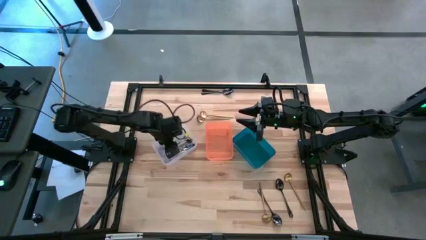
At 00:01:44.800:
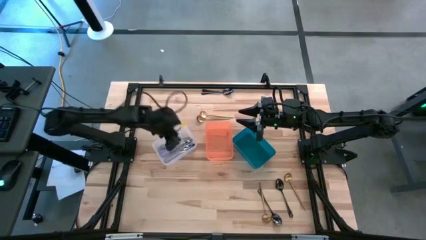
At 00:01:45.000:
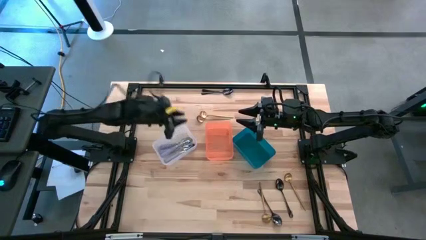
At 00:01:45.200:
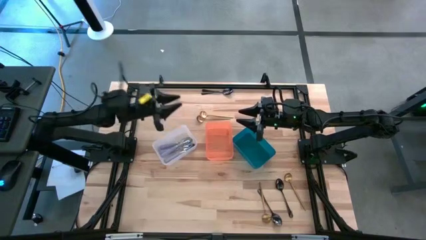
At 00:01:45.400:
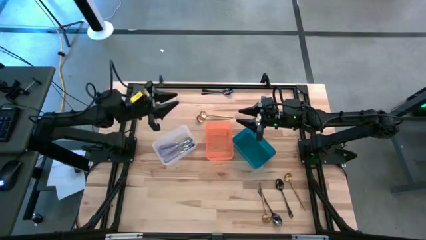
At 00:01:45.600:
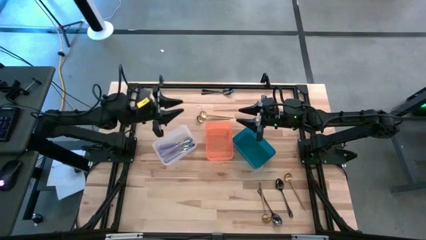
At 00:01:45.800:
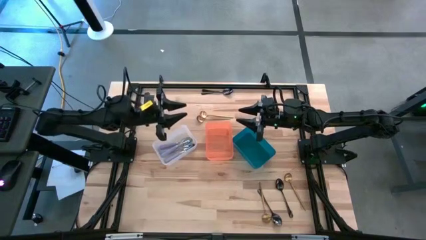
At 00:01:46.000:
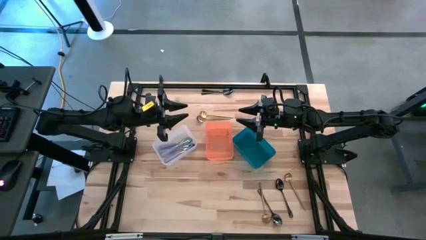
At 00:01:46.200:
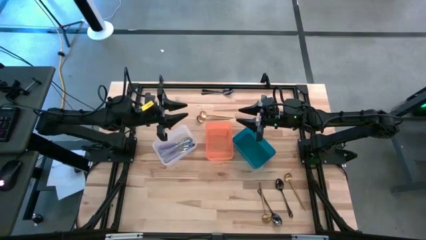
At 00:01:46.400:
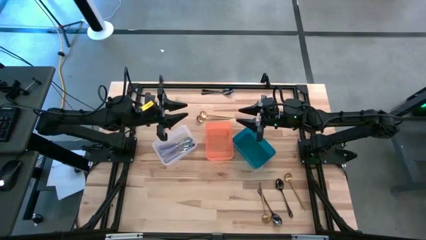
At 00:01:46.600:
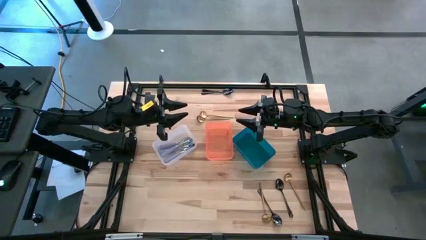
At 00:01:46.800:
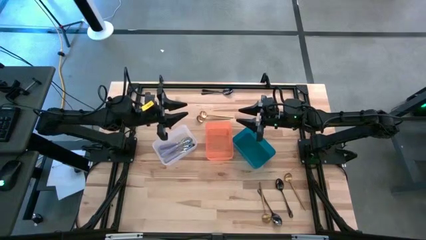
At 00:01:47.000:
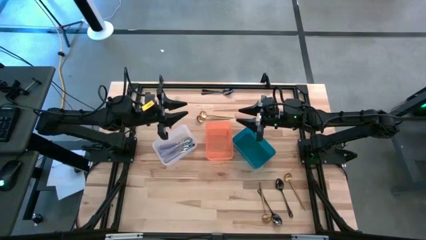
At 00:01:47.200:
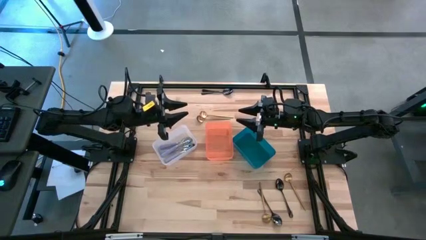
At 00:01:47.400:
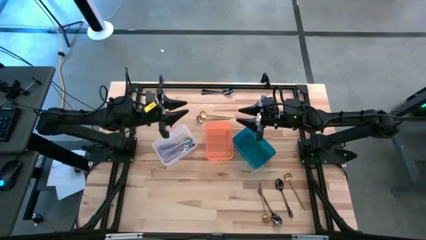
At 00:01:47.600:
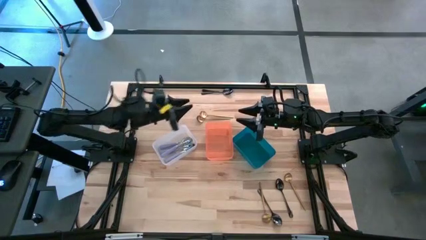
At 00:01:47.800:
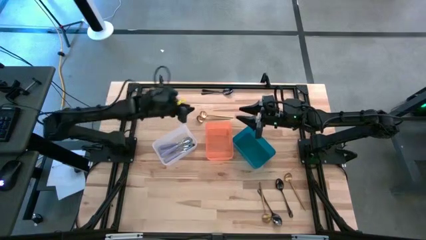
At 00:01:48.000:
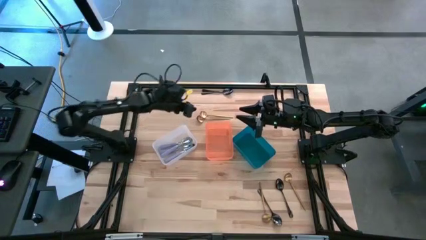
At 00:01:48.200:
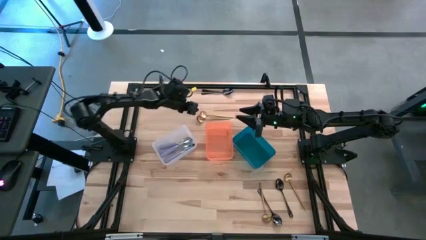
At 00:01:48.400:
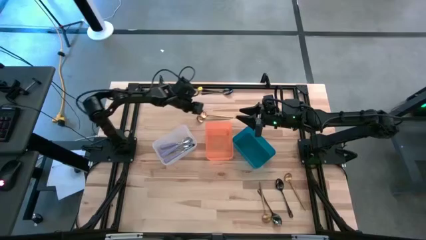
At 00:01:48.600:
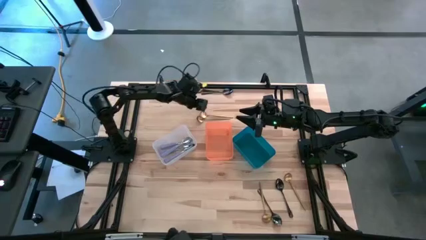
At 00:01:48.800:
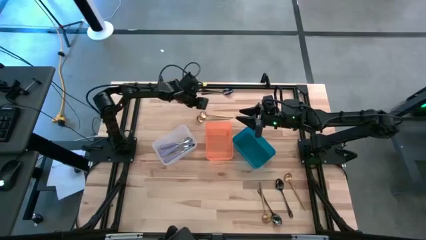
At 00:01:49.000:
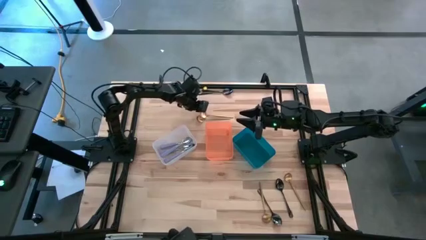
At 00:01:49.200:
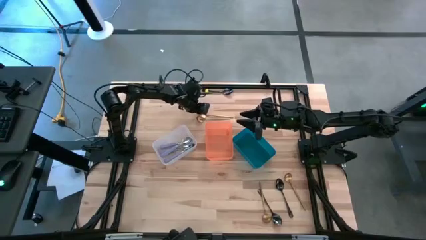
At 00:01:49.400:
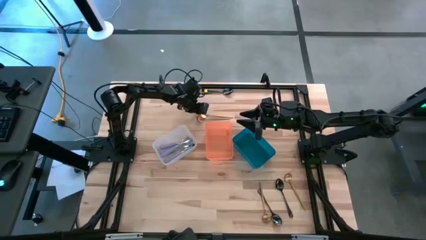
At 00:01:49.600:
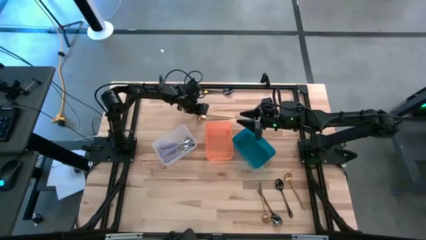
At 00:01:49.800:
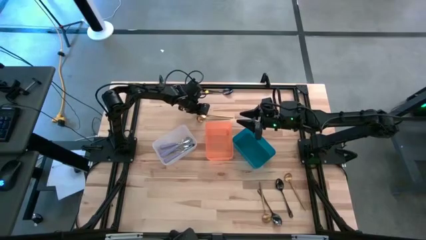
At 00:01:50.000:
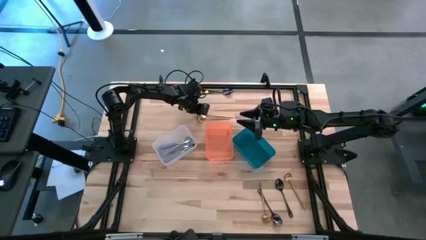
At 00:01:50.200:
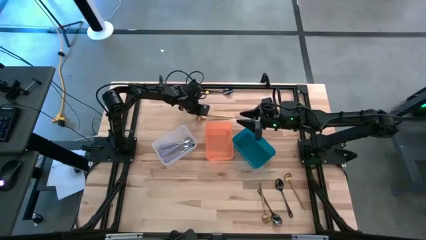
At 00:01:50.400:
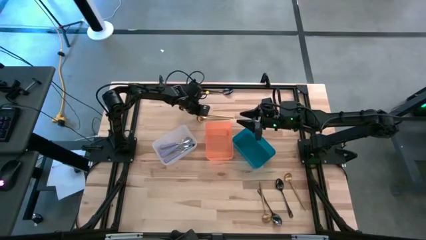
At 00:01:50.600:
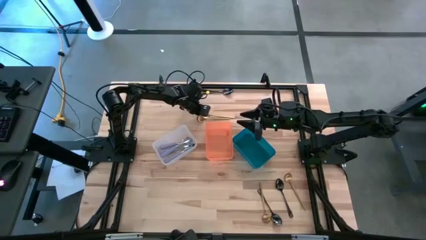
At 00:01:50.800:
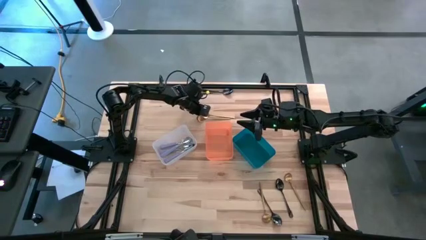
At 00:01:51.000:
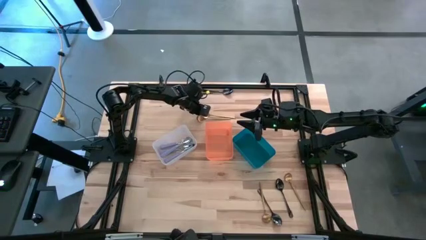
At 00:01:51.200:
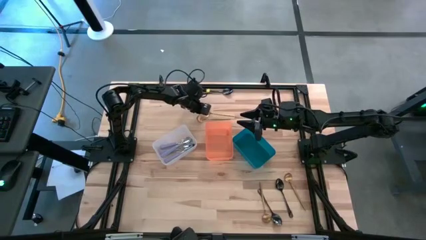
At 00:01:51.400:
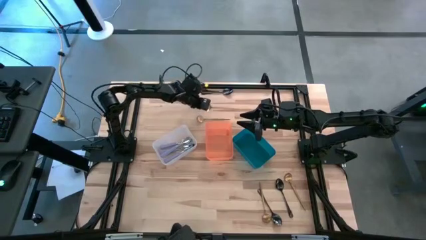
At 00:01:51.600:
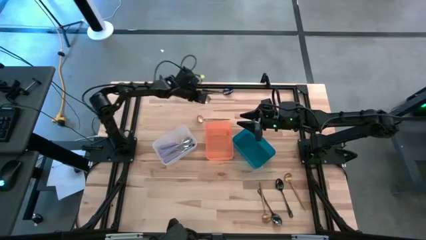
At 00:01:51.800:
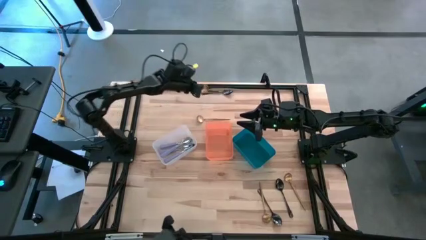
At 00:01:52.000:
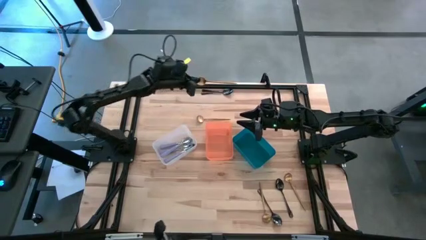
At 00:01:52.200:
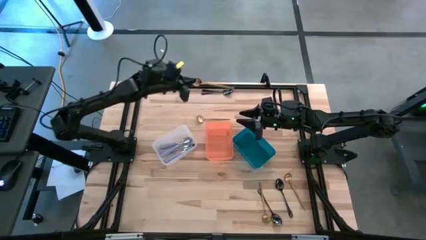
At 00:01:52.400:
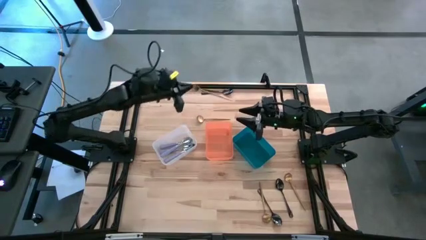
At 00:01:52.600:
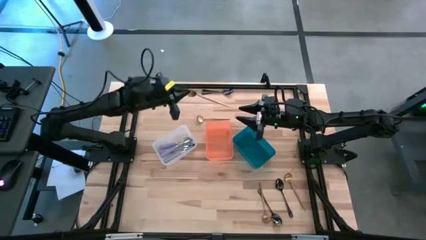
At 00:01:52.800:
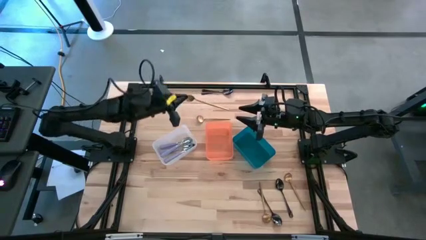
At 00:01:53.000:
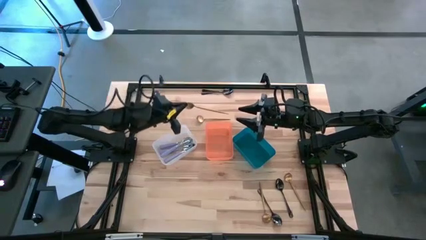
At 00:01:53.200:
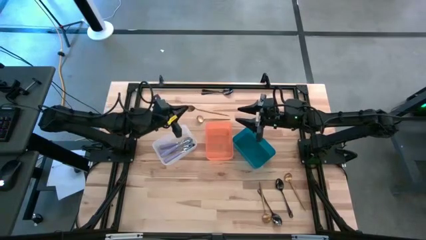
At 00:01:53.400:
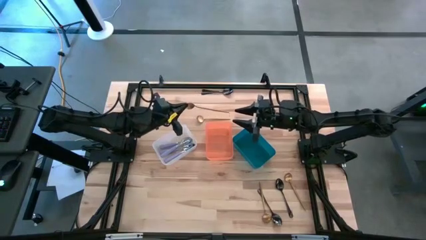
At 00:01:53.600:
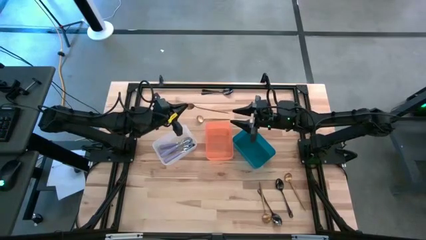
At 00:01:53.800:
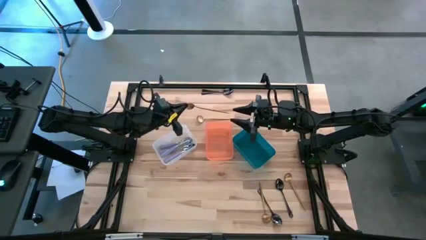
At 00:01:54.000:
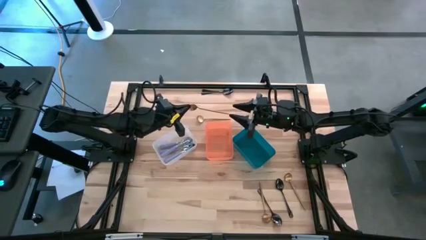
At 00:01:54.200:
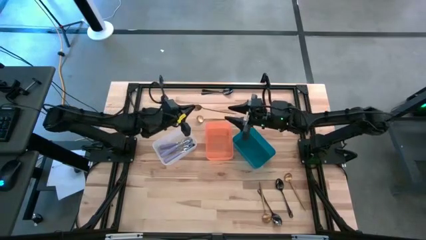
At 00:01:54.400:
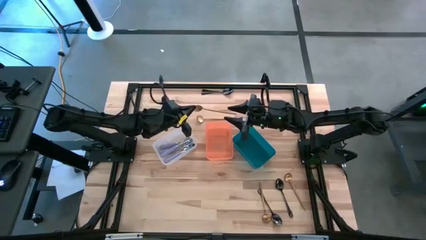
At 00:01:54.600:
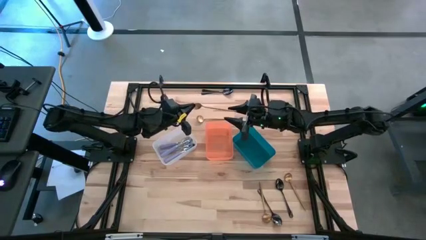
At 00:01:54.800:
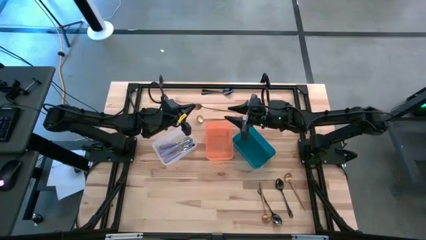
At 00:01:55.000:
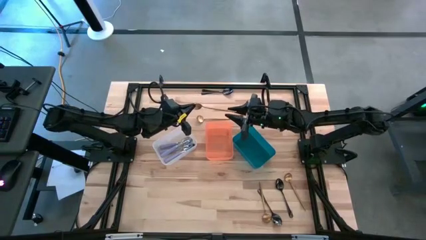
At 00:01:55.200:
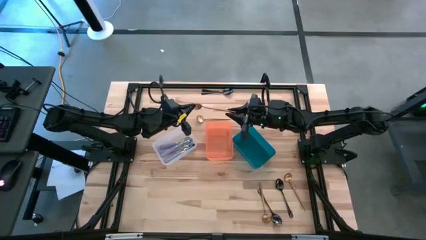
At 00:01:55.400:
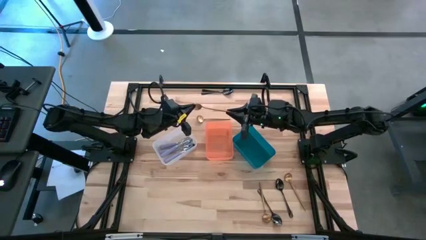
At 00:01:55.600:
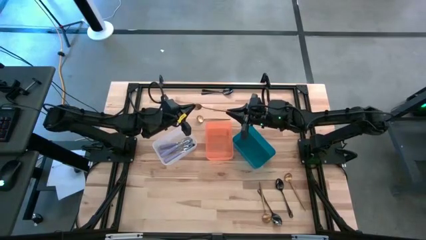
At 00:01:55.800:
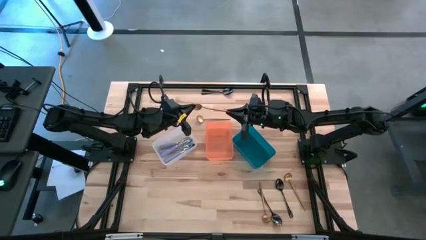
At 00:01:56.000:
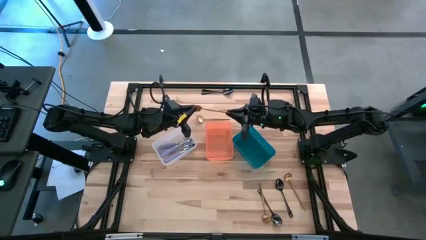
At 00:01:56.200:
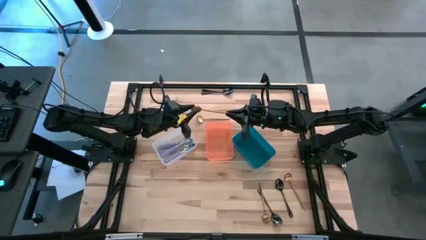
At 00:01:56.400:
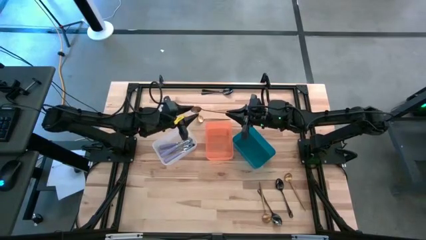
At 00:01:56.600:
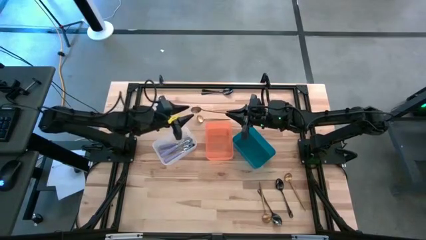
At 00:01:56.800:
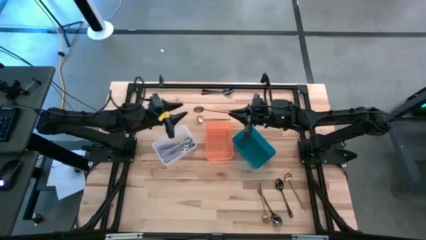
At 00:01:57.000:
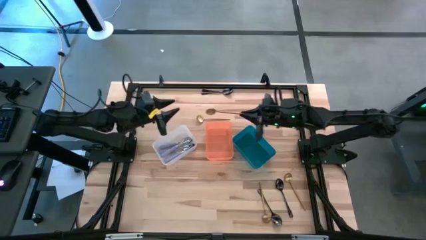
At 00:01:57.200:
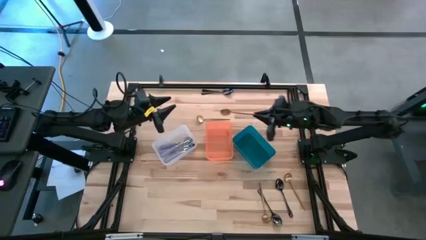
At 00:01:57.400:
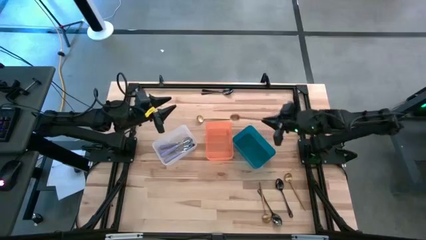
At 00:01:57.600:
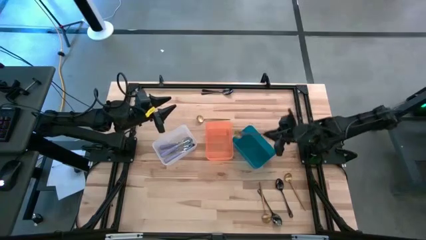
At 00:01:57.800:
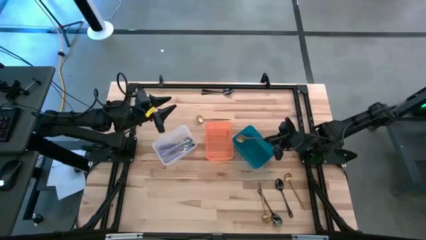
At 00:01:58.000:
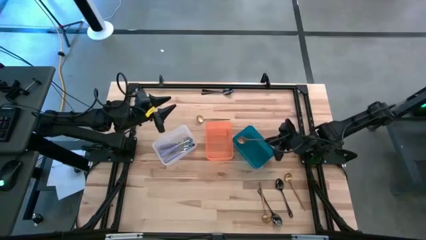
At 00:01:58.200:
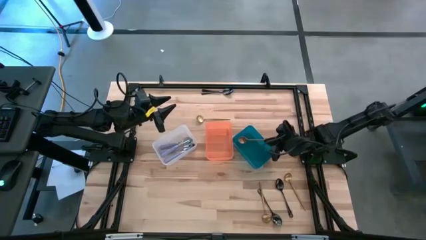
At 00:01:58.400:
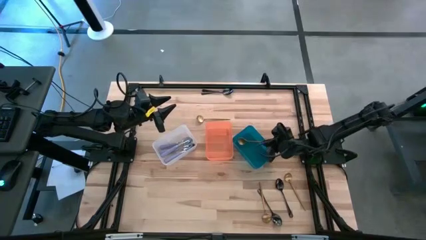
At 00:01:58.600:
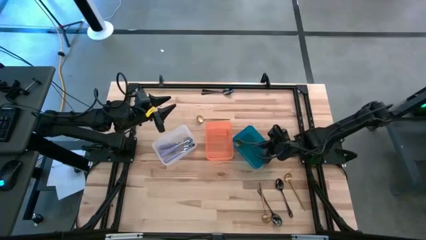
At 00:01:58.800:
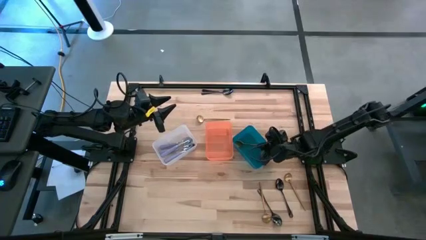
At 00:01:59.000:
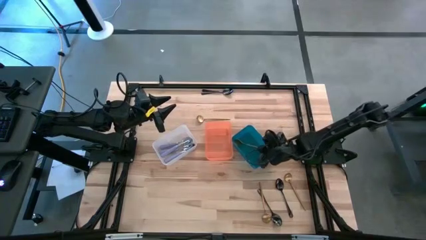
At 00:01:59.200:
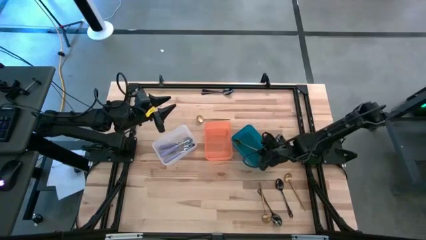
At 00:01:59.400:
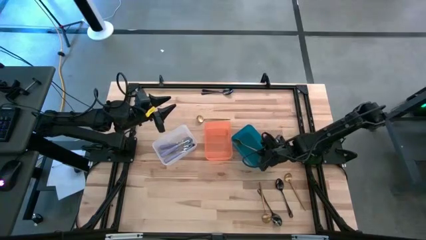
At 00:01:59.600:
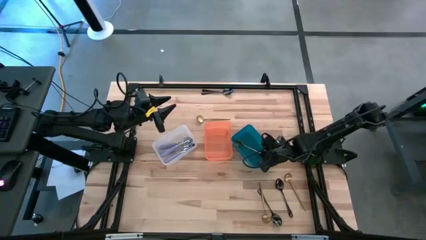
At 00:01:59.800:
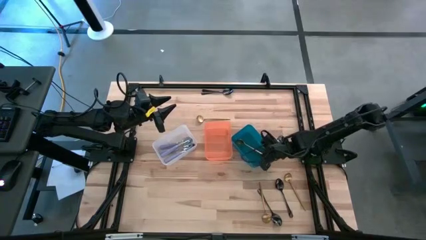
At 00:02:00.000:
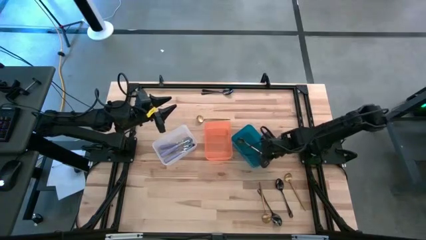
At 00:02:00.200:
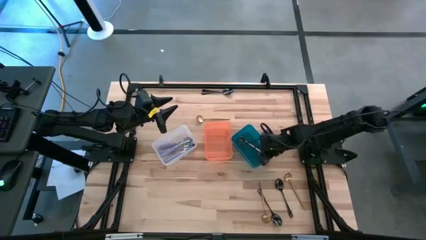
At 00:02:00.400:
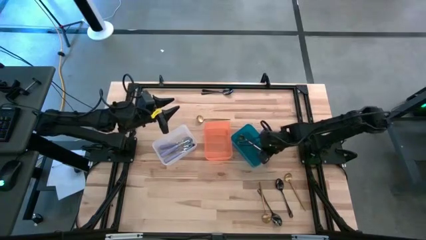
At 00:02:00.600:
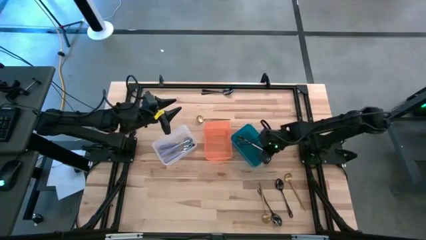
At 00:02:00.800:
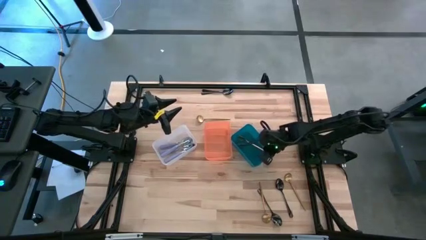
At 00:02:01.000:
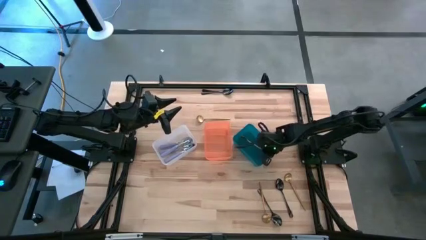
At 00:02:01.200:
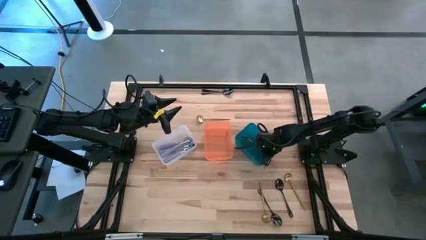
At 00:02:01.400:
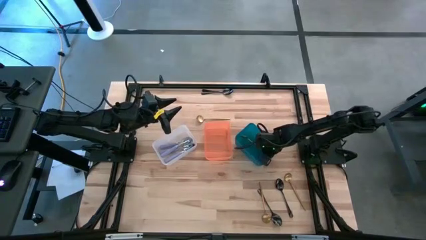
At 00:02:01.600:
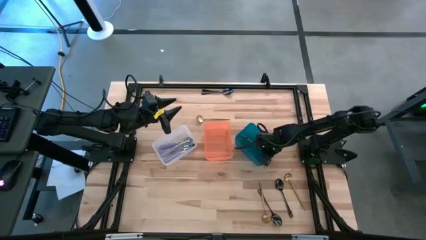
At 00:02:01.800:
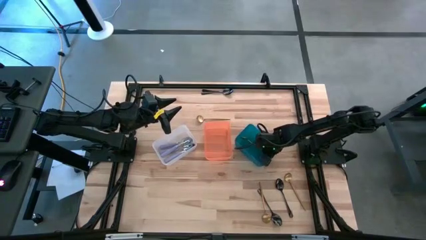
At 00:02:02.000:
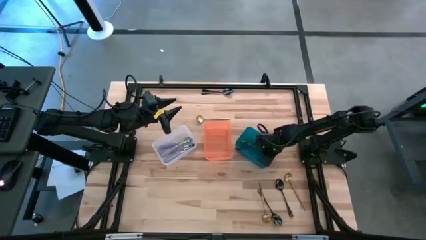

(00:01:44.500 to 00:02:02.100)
Task: Sort silverware by color (type)
Put the gold spoon into the blue bin
